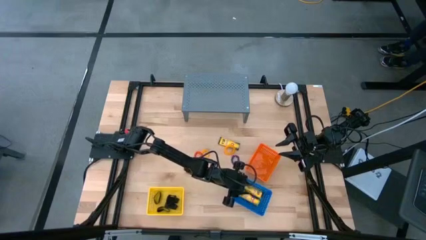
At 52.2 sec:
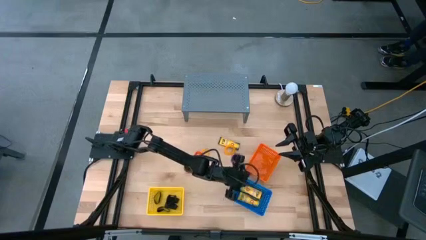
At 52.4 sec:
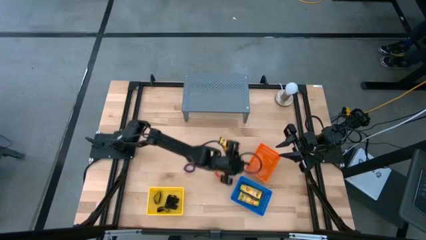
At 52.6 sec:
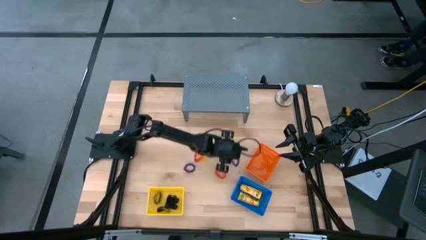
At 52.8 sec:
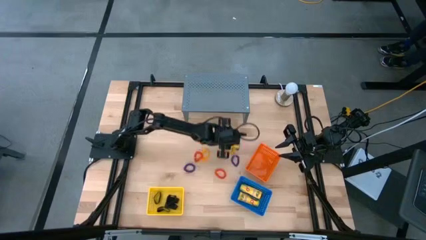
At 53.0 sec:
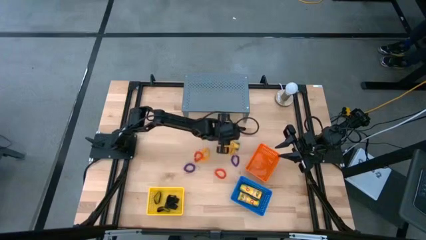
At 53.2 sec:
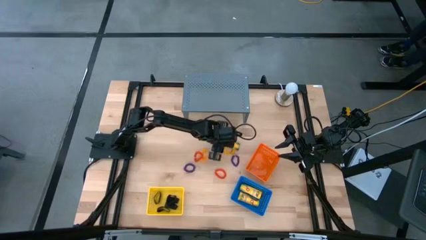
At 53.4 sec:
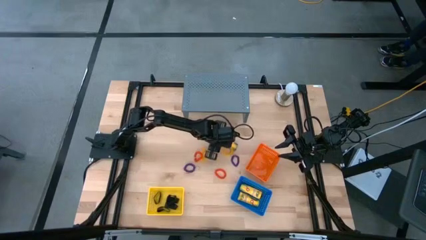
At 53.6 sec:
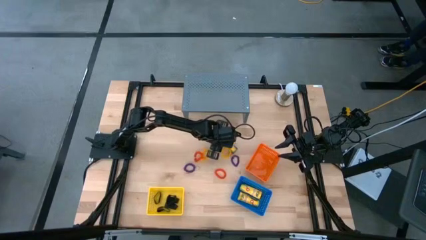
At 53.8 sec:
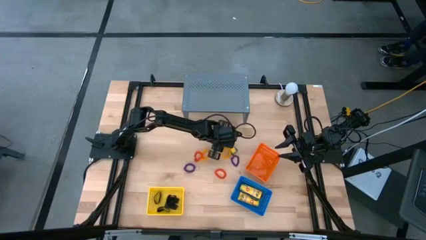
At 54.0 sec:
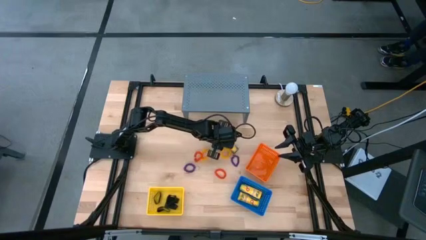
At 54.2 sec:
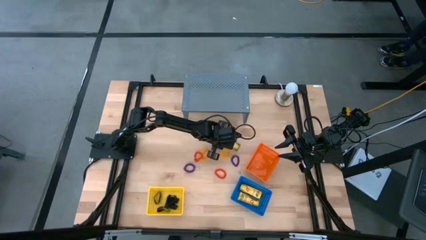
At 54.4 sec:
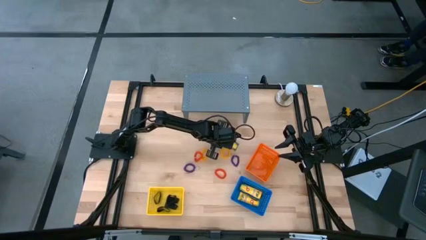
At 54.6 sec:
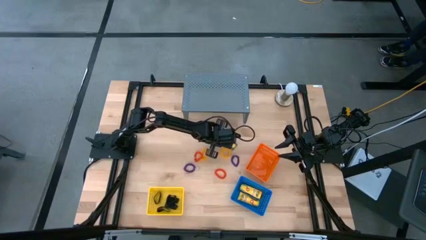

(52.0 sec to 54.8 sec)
Task: Pick & Place Office Desk Supplies
Put the crayon into the blue basket

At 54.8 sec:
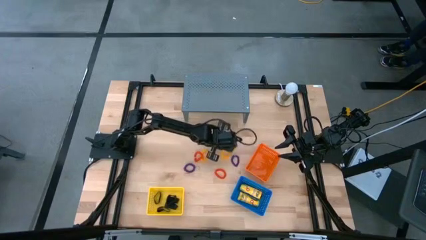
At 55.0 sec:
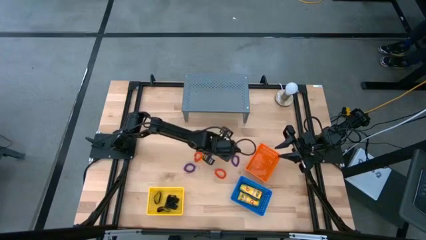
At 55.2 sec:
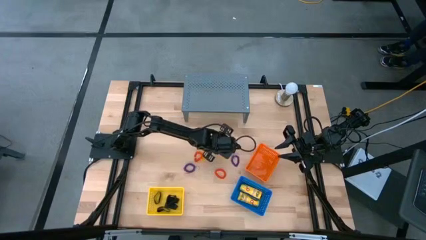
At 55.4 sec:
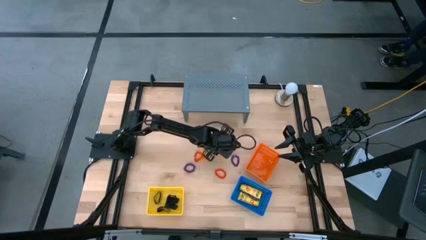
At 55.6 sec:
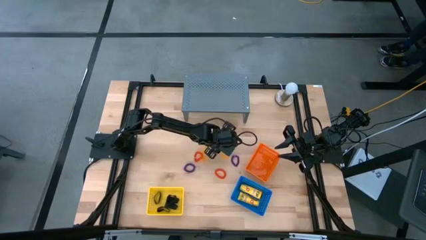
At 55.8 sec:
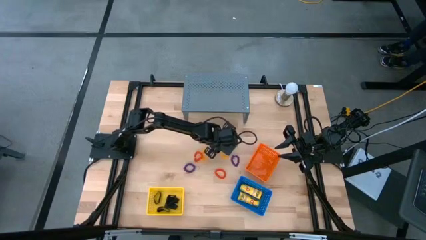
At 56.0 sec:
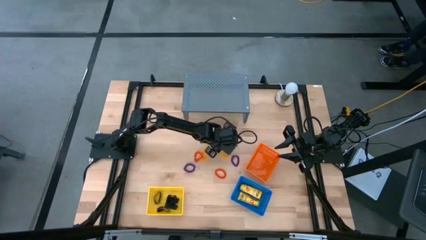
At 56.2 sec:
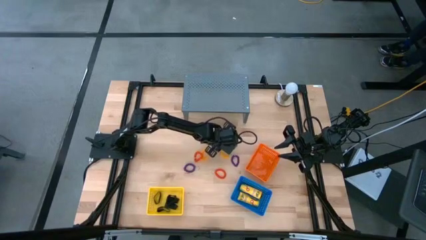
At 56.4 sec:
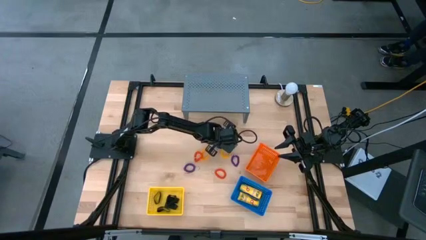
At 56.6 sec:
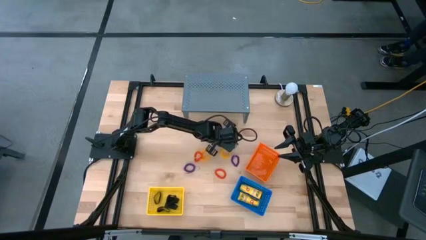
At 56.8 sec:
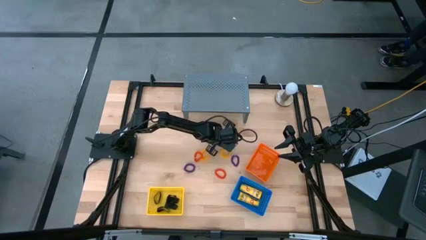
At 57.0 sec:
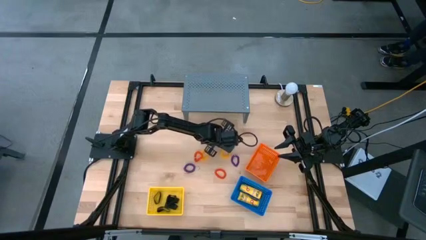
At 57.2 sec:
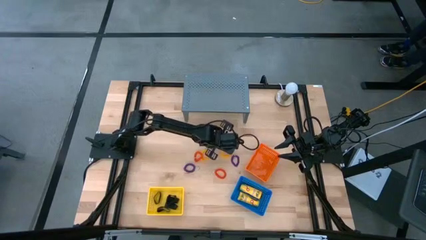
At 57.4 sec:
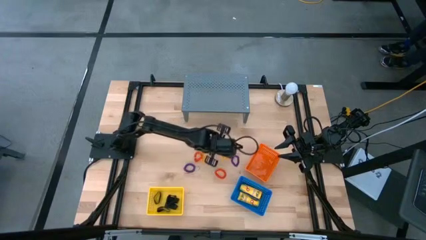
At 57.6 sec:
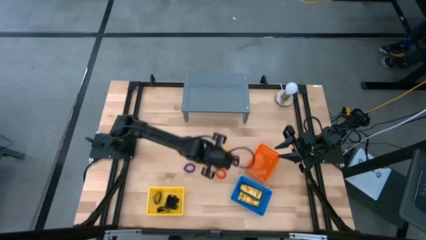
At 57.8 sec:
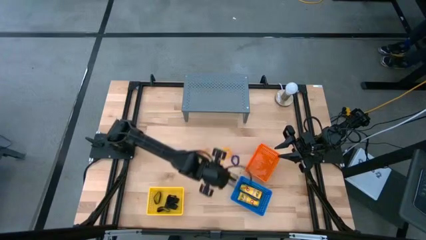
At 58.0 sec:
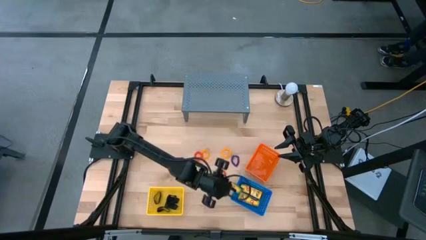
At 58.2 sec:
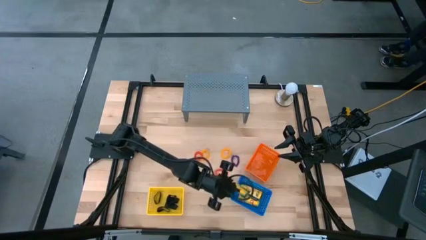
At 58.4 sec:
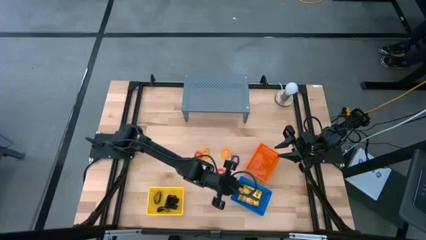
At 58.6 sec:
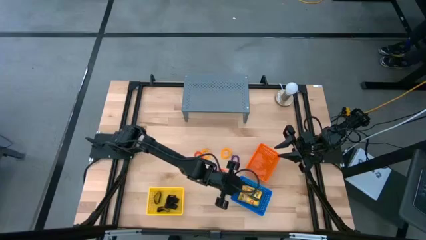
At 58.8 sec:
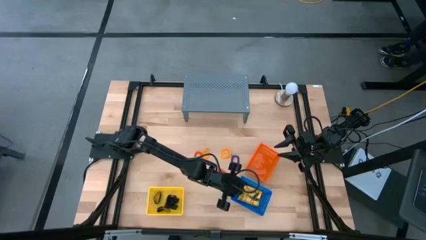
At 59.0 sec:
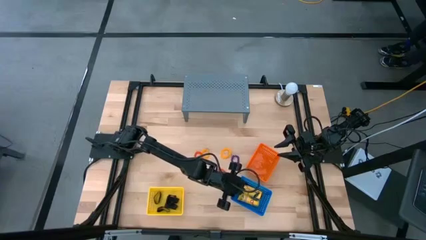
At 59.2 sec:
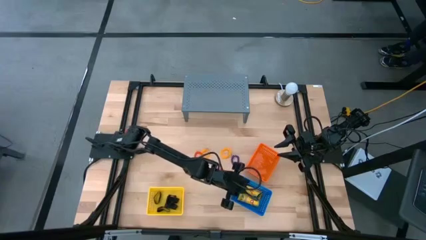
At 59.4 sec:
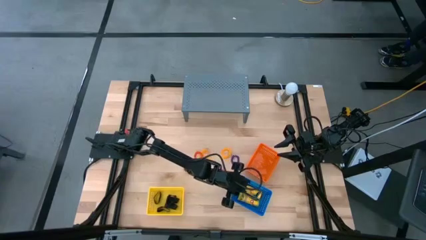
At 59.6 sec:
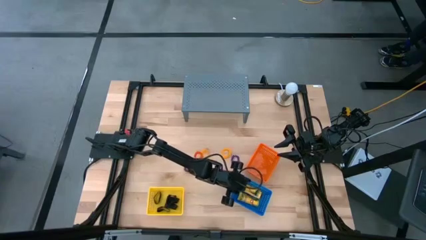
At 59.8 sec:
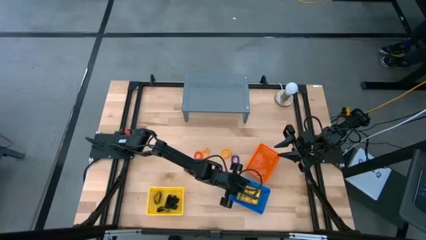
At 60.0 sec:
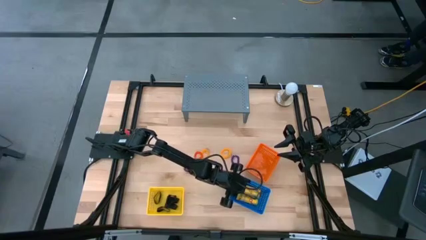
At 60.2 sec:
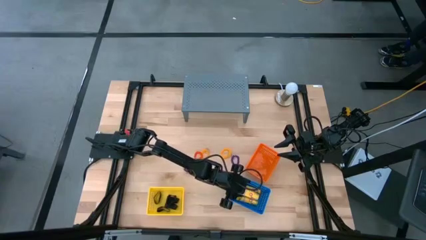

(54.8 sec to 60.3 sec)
Put the crayon into the blue basket

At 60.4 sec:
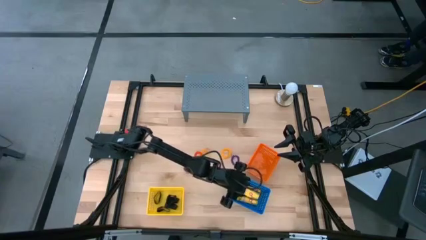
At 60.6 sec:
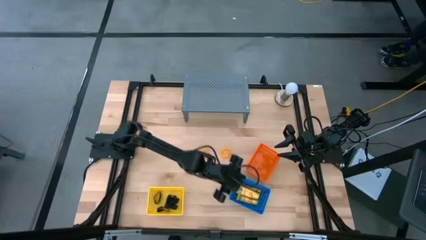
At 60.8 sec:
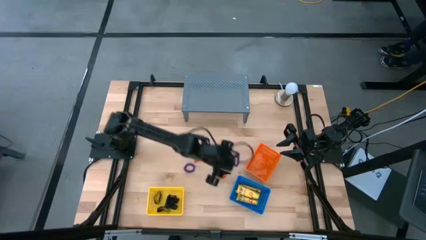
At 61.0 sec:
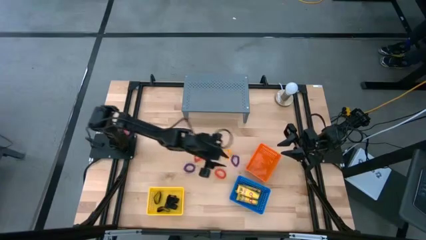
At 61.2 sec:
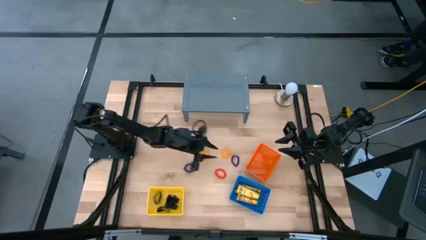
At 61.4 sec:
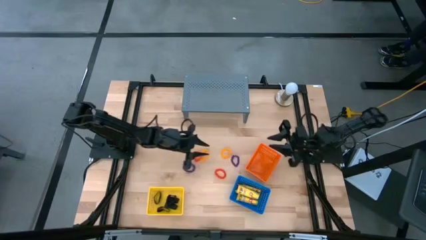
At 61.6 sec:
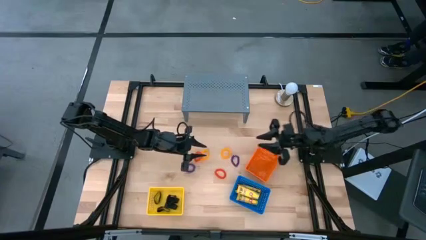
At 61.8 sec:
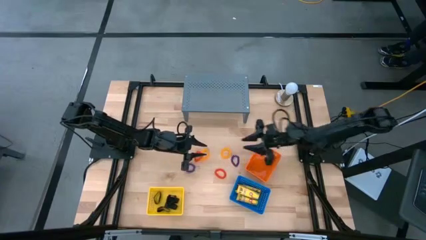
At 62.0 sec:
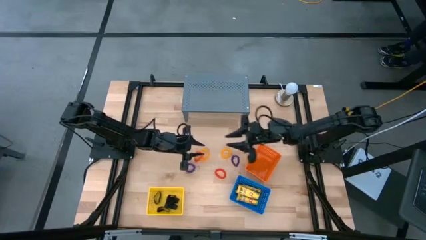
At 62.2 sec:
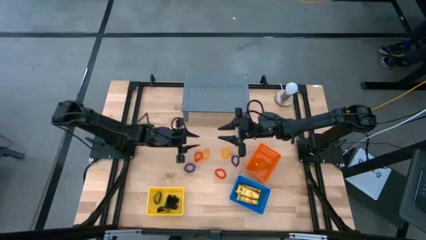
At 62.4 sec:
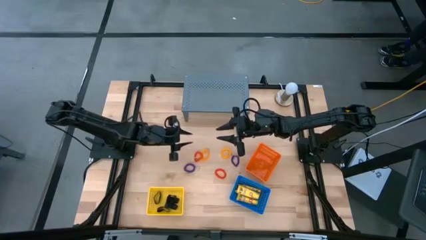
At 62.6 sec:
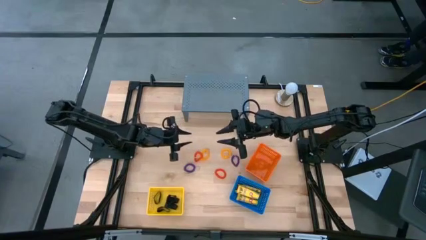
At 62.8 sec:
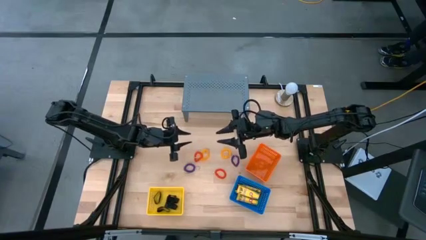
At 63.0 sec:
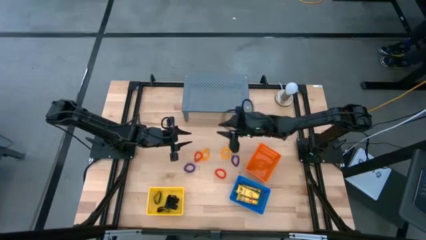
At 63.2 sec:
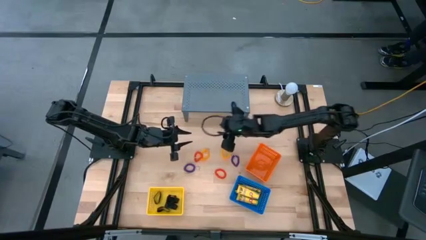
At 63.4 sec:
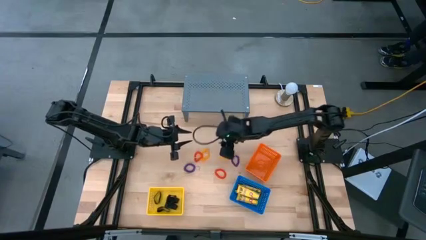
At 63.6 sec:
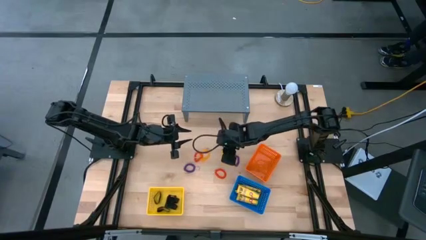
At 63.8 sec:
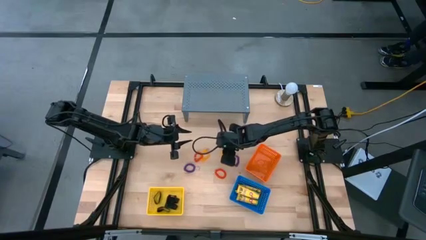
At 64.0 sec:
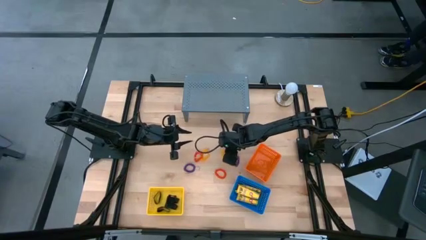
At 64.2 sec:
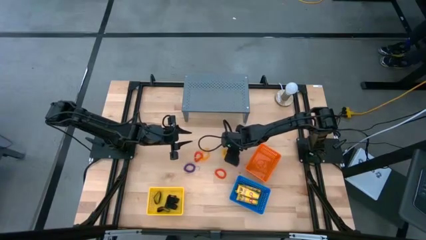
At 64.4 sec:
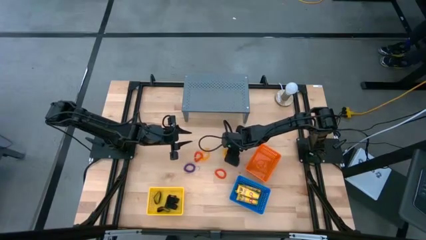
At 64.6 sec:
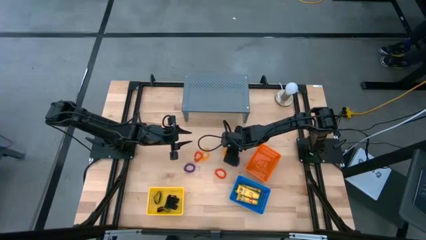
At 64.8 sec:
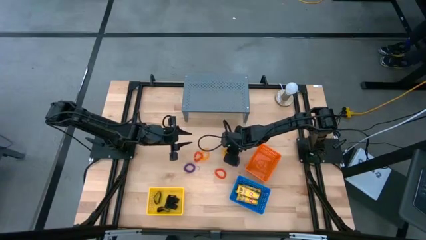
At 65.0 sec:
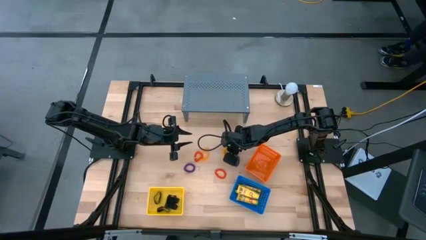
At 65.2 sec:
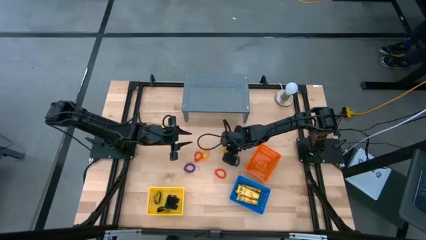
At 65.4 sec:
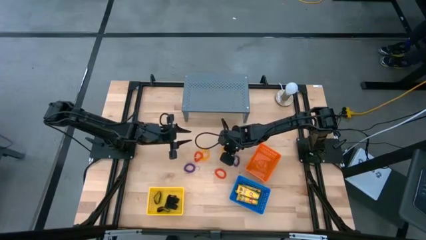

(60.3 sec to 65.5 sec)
Put the yellow spring keychain into the orange basket

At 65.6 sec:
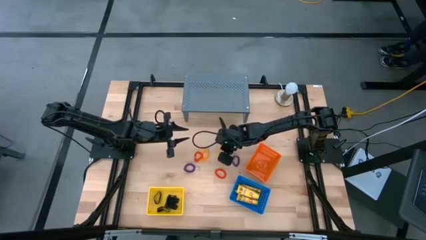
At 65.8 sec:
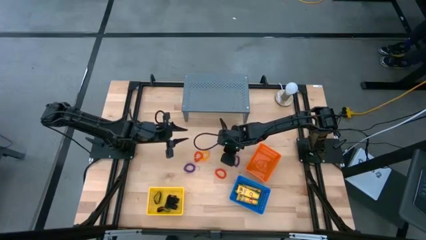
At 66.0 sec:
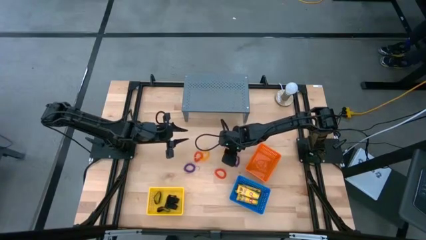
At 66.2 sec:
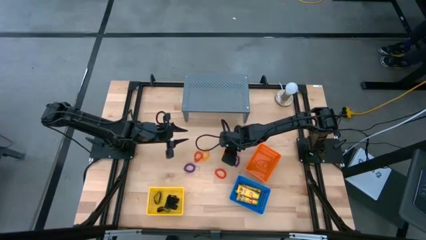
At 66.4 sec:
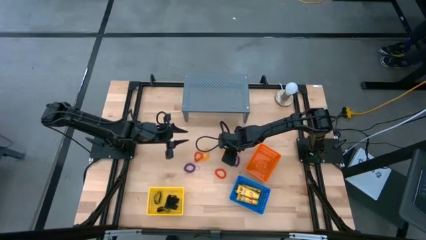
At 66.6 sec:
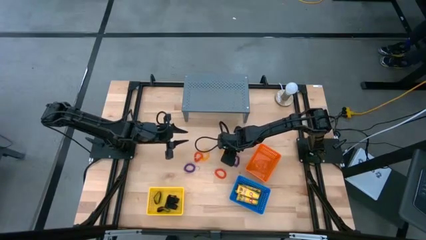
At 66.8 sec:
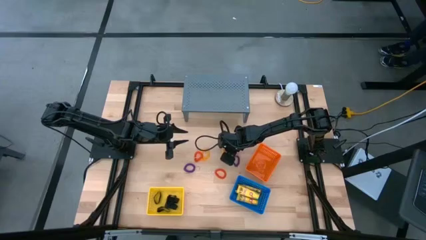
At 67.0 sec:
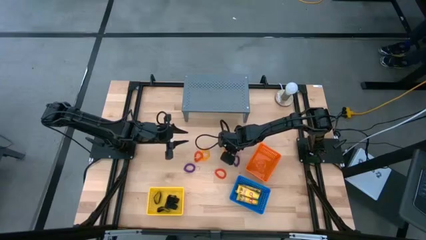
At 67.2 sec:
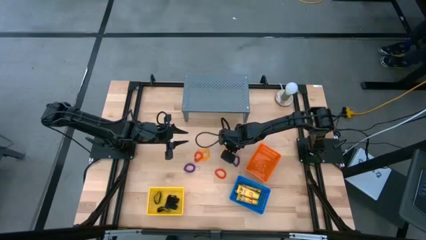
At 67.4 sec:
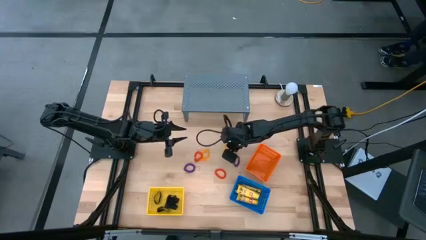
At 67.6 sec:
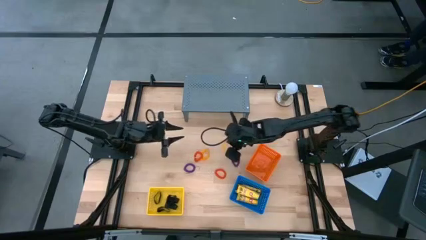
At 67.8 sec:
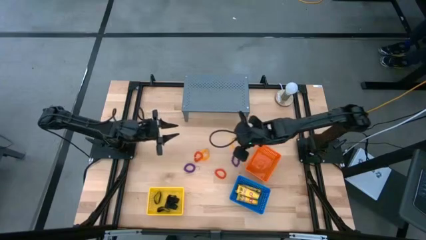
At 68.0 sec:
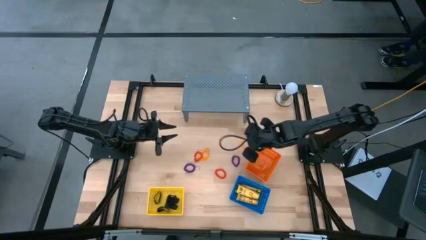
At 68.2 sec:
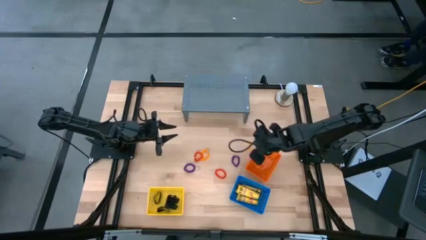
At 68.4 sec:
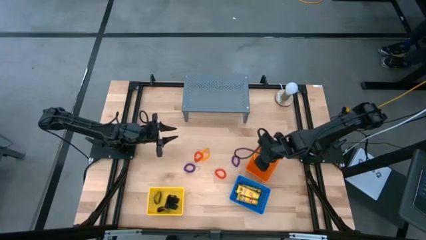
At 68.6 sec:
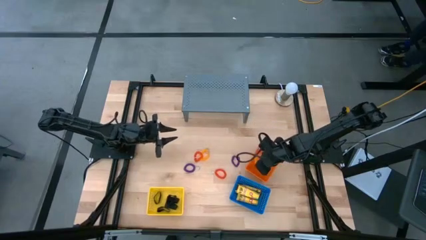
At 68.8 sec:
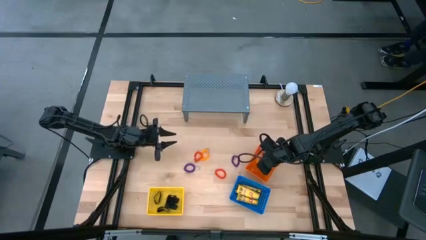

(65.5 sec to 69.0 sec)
Put the yellow spring keychain into the orange basket
